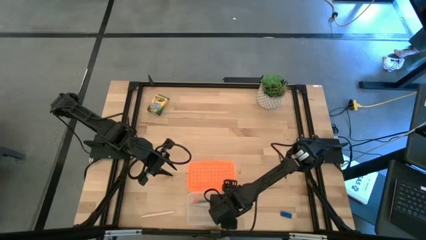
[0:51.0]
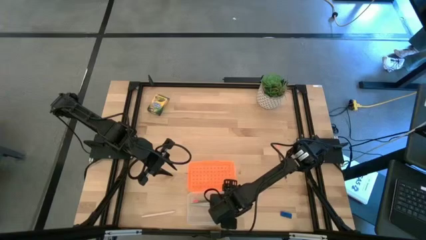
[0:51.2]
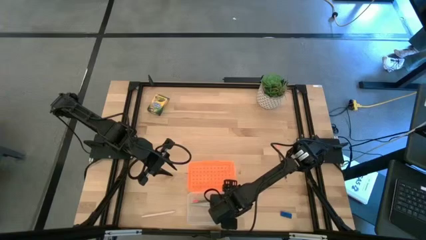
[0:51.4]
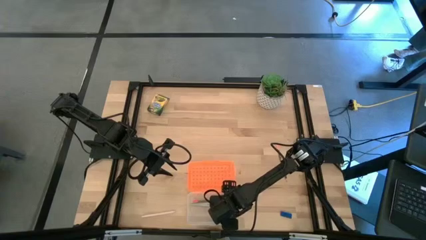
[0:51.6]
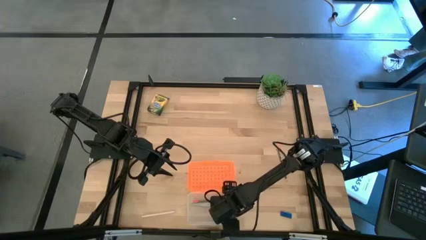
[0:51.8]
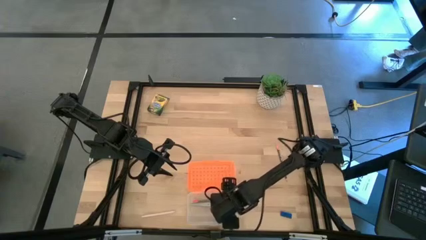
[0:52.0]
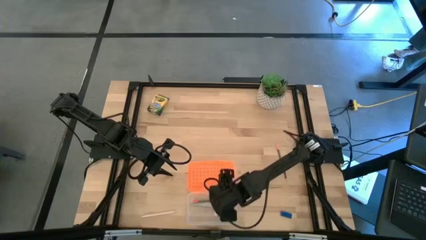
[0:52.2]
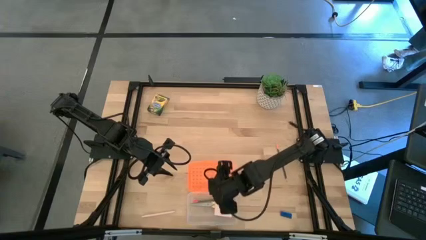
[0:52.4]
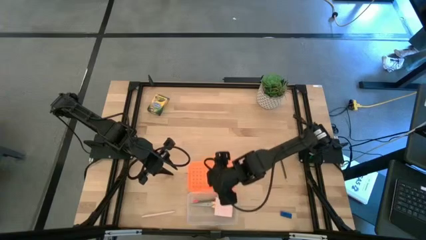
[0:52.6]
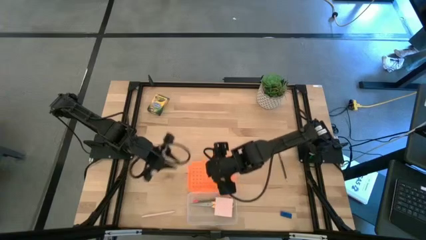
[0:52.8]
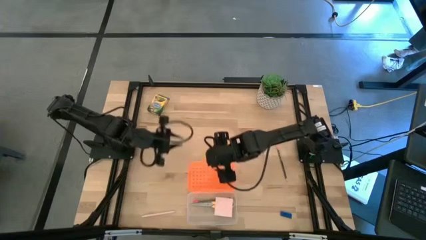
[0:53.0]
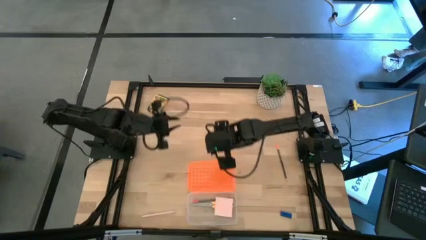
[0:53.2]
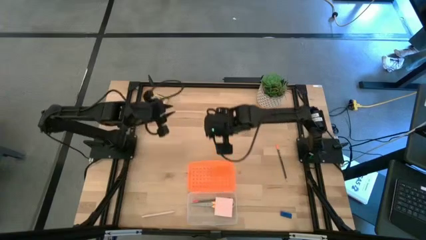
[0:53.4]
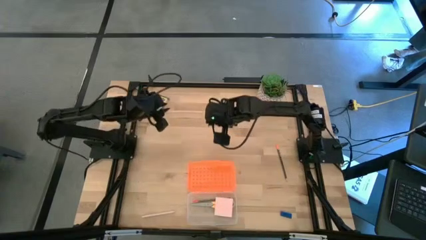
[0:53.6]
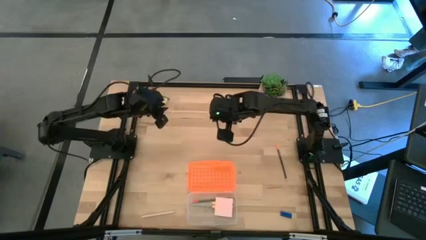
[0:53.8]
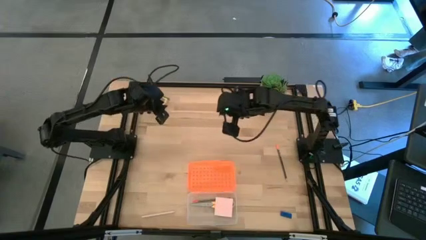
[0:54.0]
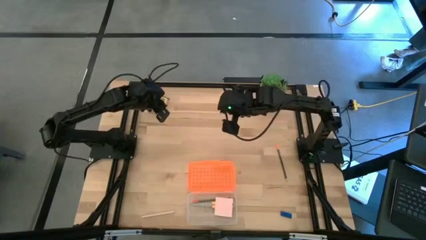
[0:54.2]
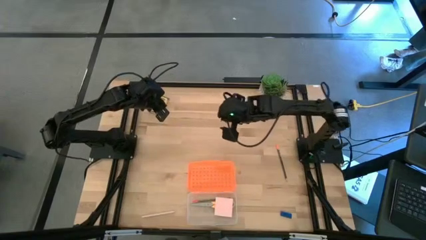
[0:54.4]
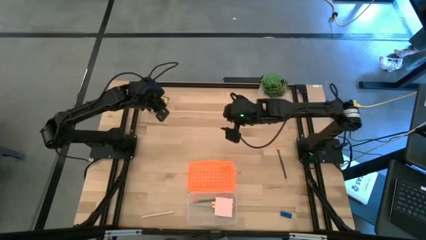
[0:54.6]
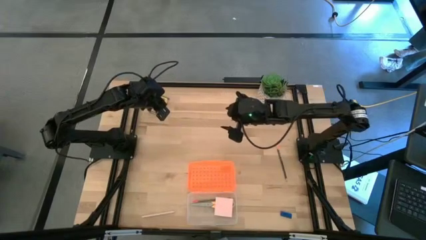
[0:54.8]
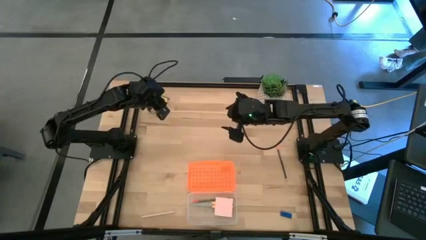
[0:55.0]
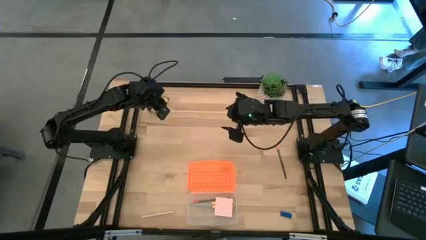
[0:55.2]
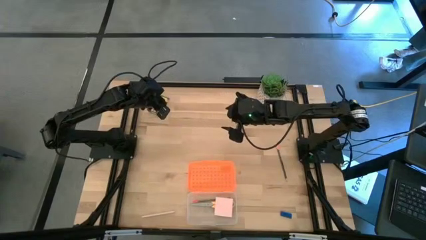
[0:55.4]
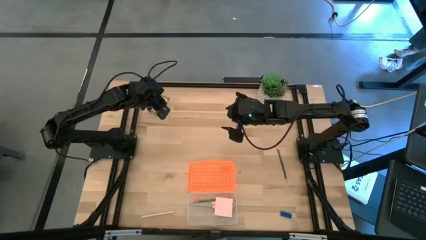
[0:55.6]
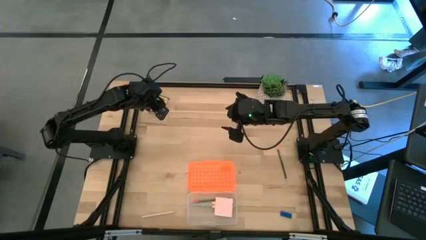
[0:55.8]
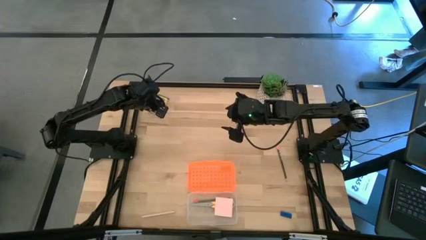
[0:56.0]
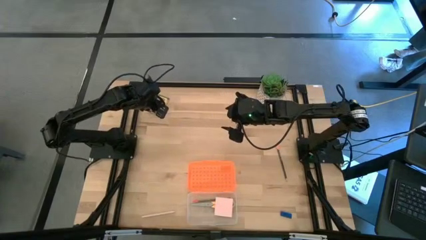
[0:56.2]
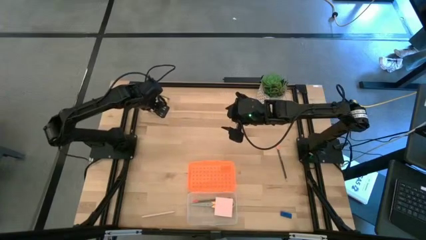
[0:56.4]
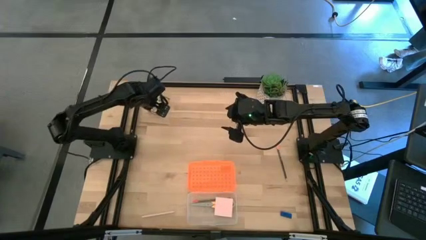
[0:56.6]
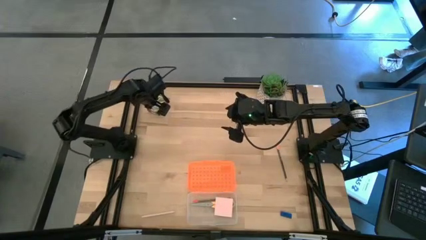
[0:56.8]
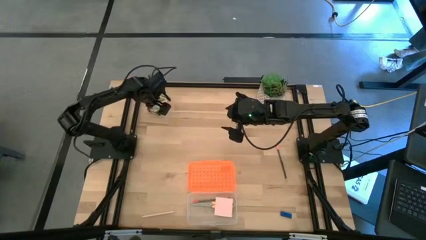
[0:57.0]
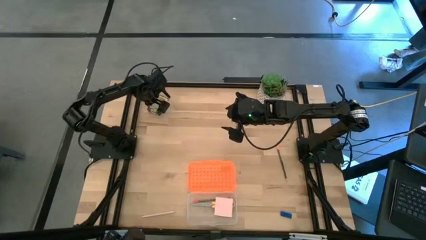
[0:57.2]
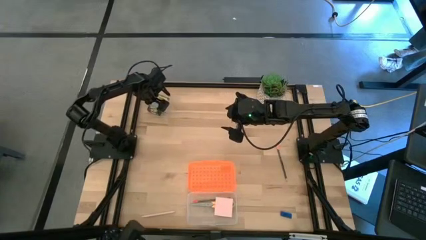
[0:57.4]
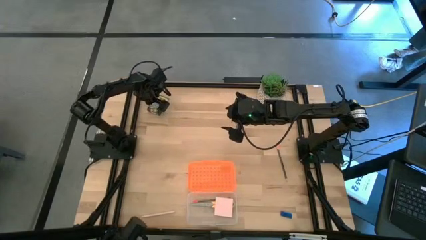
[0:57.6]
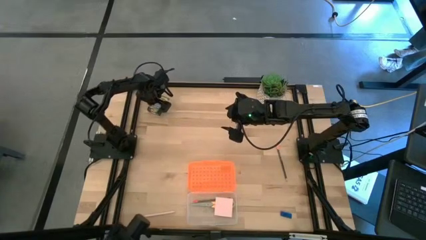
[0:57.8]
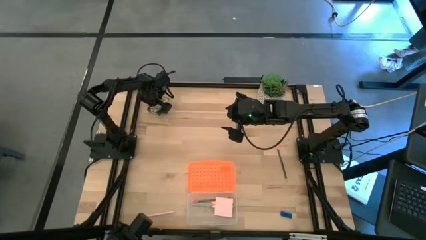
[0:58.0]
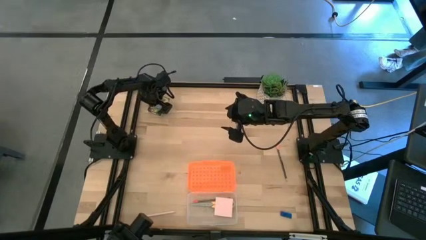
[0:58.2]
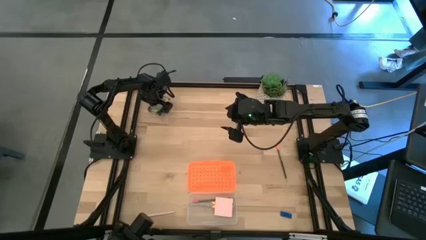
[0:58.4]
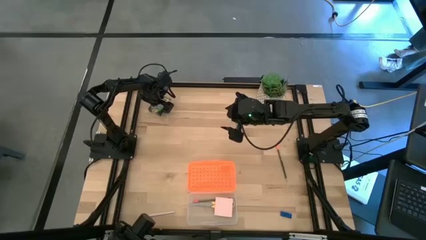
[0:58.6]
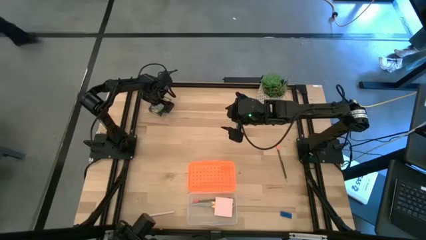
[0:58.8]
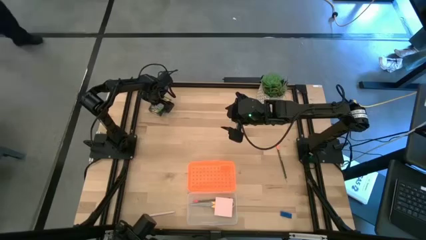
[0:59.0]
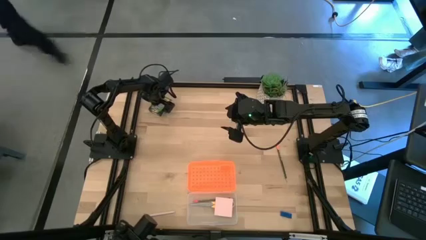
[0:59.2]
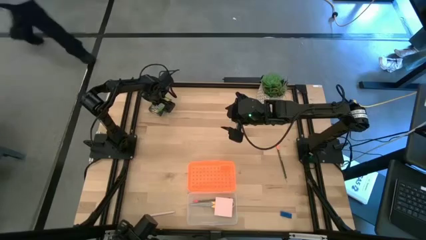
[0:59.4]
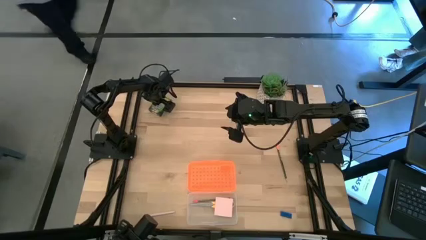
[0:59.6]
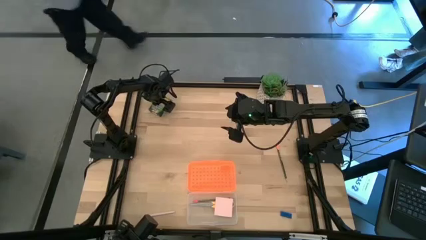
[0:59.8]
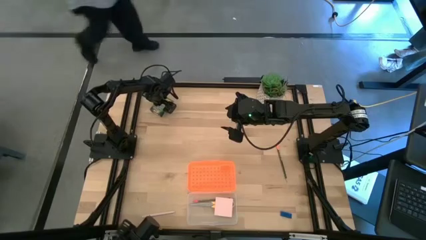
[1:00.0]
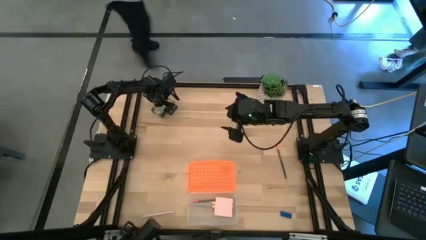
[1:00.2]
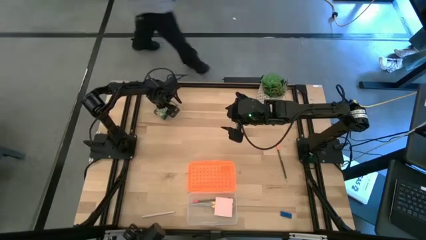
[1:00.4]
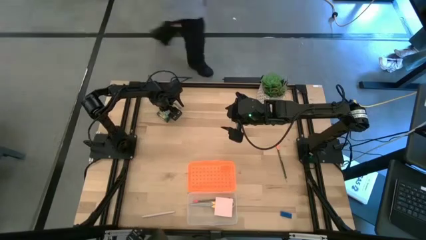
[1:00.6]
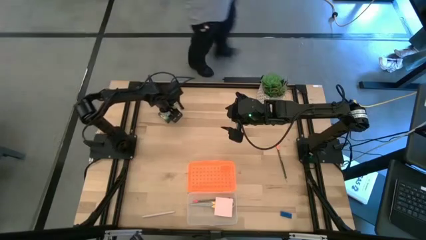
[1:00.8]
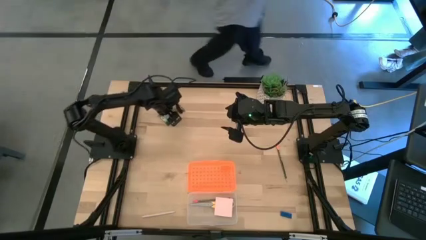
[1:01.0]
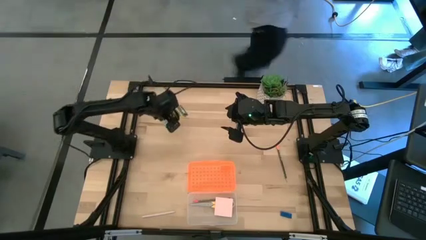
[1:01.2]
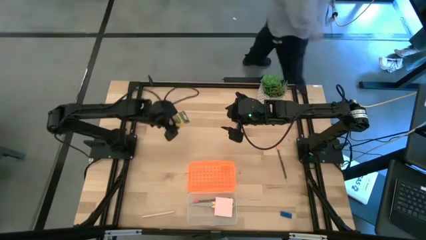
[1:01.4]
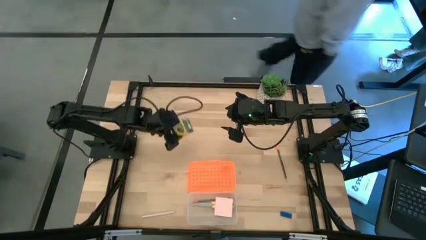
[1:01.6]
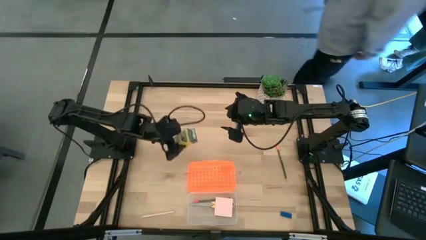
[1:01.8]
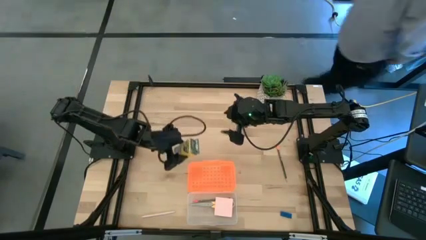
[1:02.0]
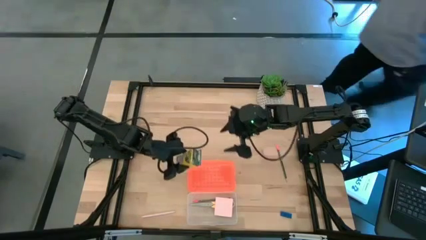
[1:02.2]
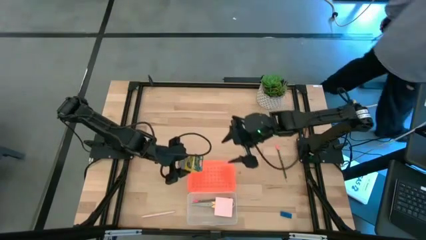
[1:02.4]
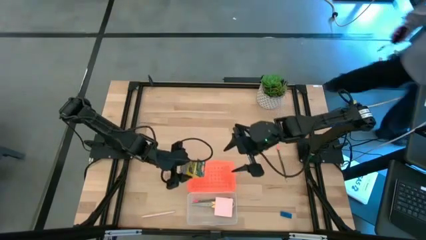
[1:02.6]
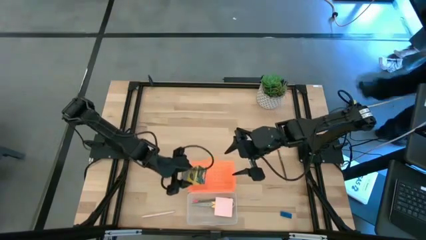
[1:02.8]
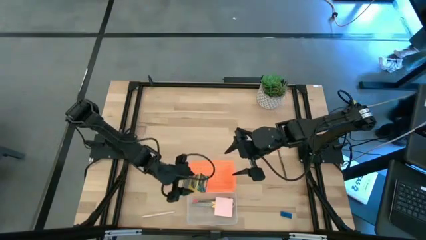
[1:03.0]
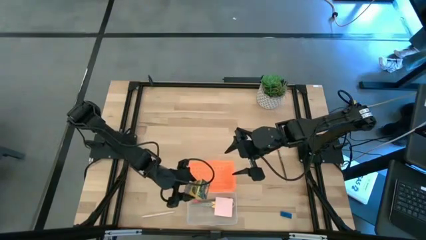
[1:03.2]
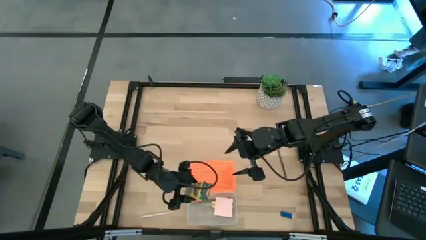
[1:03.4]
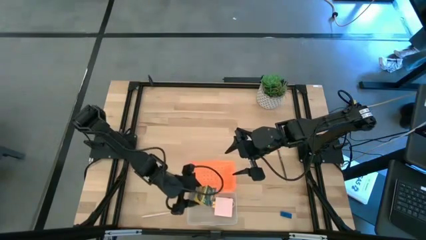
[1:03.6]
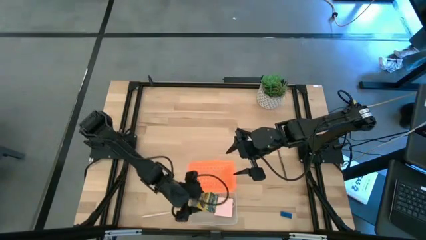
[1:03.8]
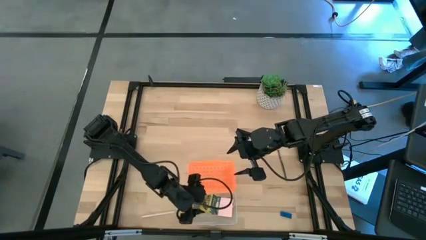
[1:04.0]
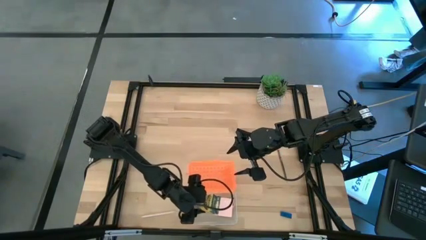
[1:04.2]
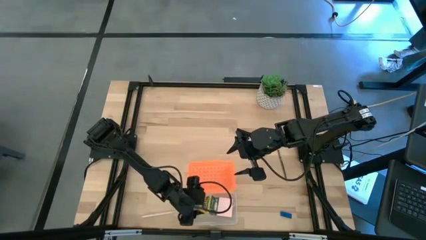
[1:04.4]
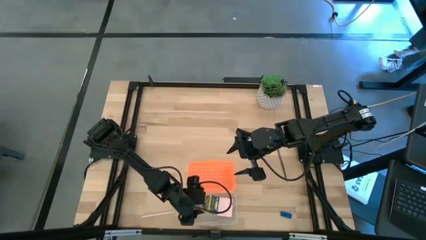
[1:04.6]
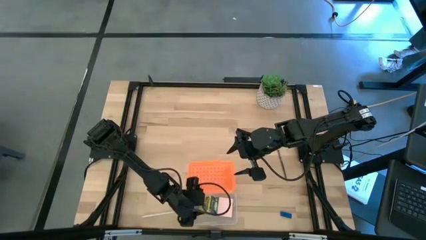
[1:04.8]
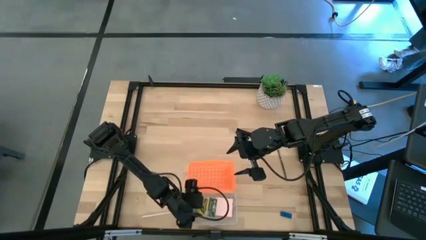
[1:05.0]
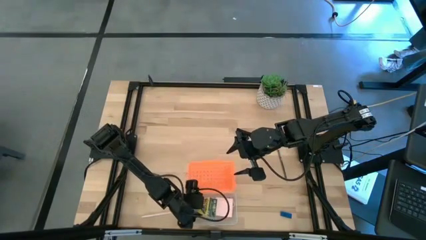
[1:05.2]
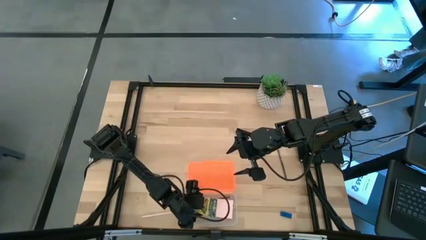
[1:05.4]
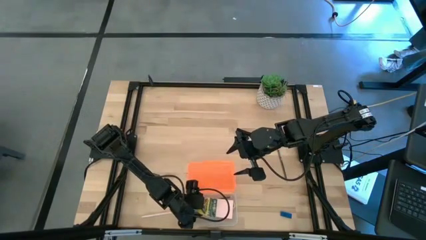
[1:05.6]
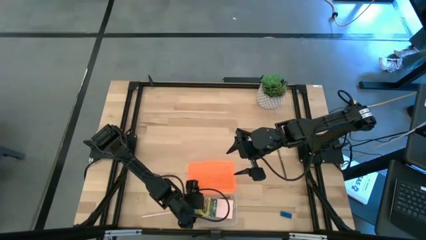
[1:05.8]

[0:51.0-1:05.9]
Task: Pack school essentials
Put the yellow crayon box into the supply box

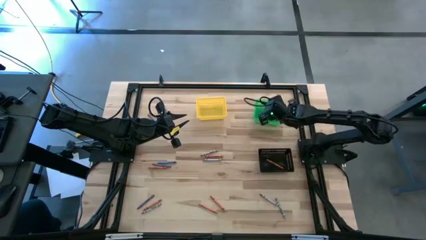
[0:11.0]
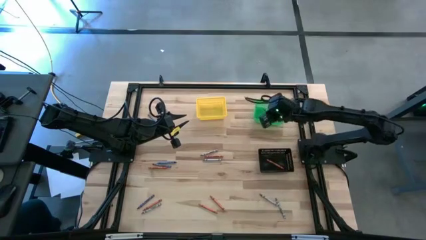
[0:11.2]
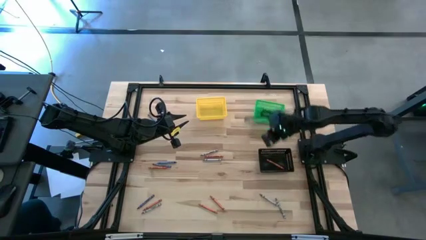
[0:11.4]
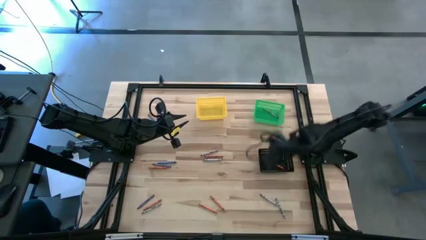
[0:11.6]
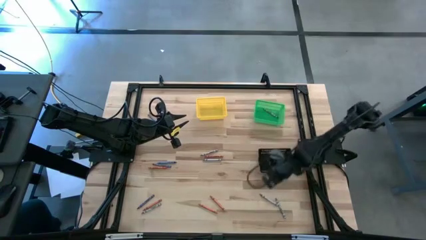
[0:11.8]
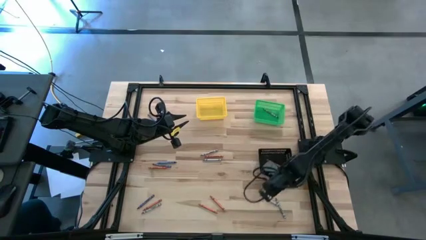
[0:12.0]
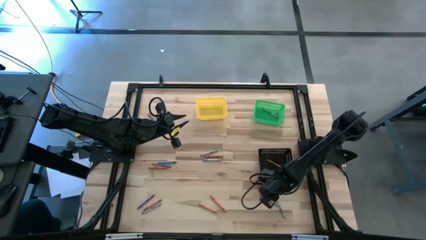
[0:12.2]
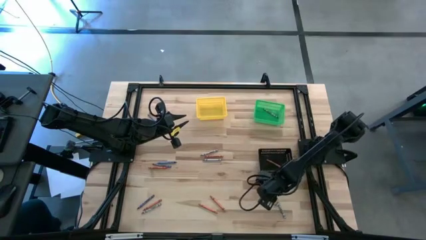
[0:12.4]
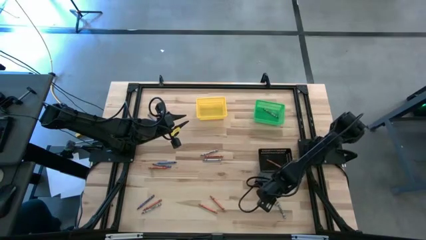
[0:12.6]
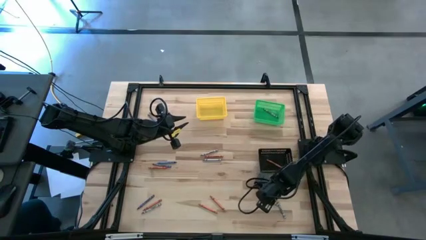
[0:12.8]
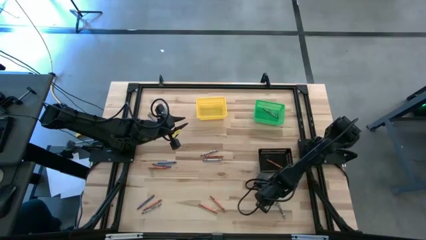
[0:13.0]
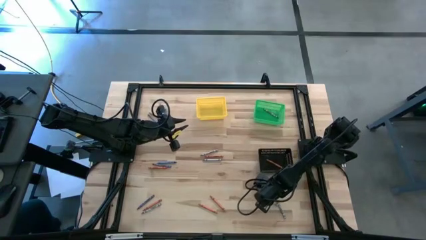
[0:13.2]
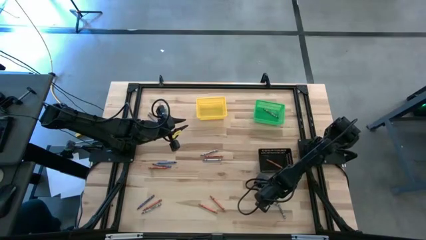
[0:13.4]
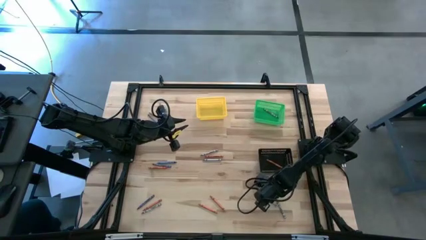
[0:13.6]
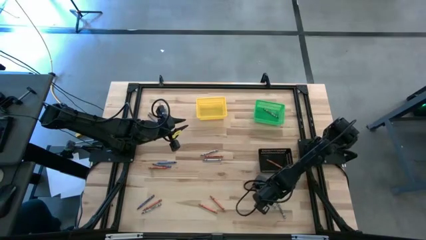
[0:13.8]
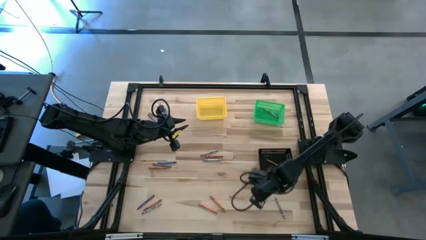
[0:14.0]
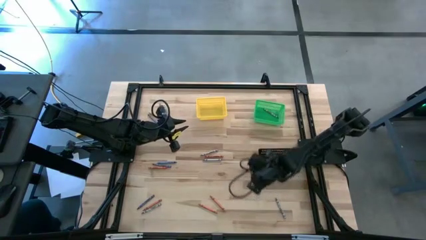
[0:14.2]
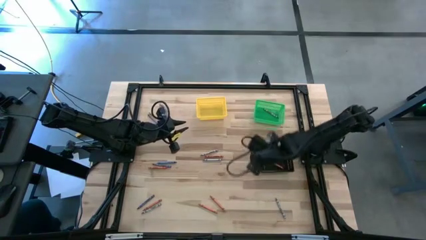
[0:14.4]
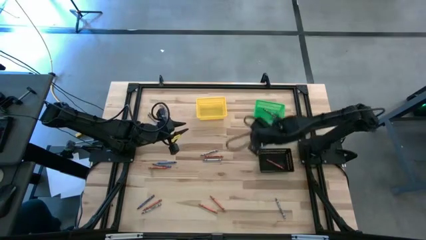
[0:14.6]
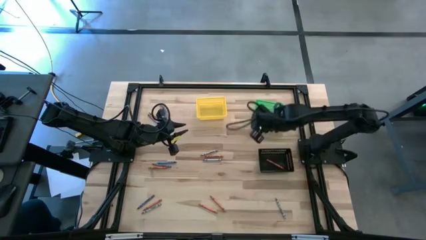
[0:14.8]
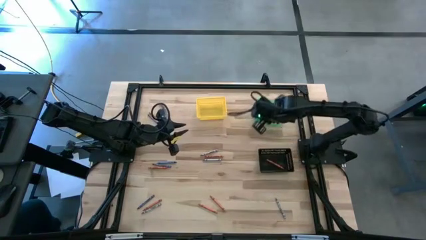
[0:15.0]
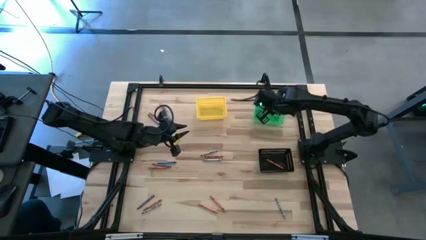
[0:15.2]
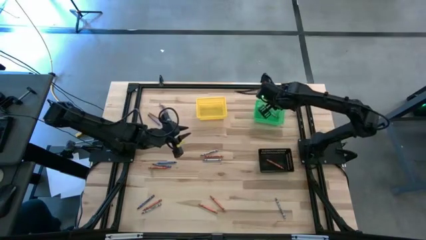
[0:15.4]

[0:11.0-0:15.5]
Task: Sort crayons
Put the gray crayon into the green basket
